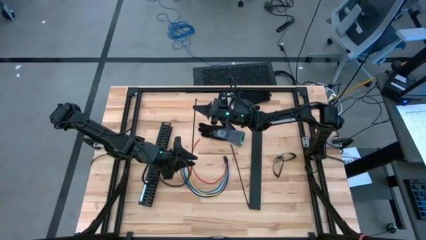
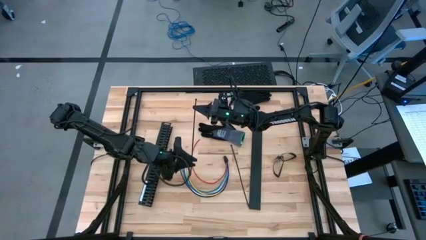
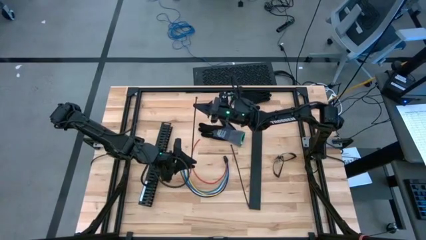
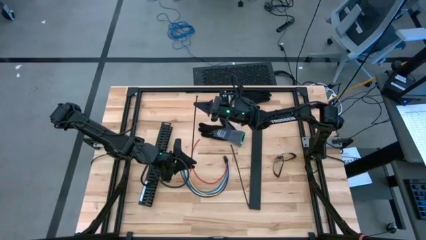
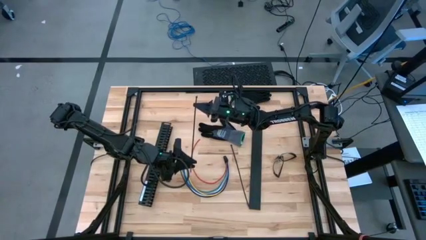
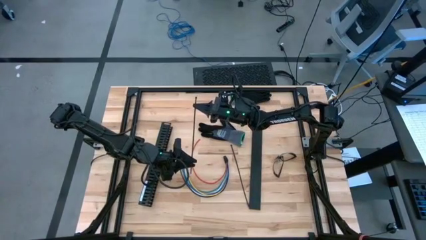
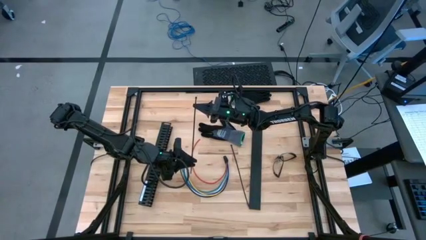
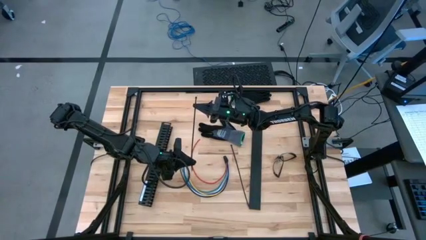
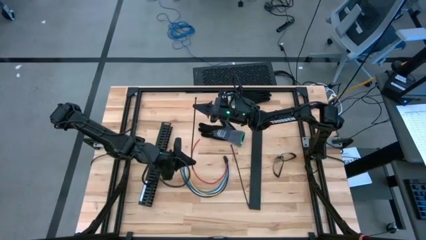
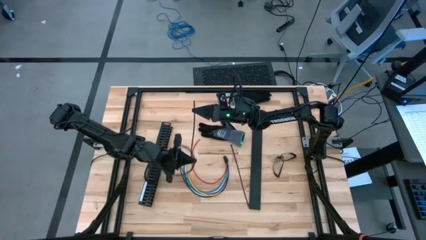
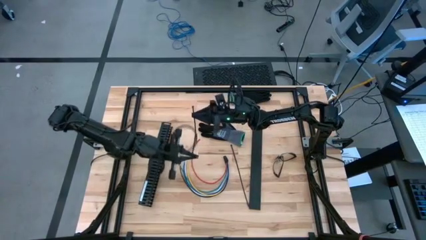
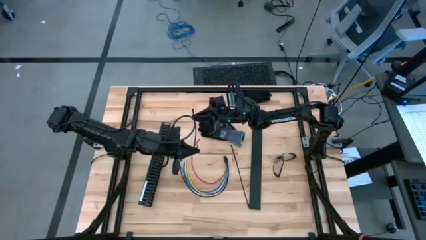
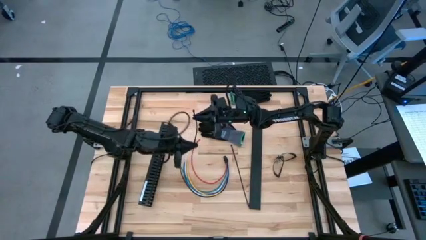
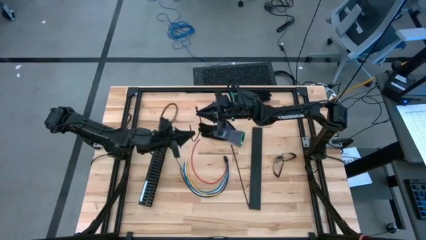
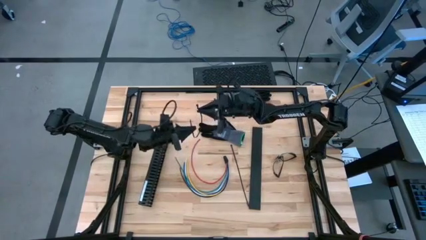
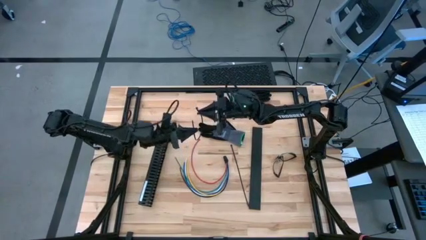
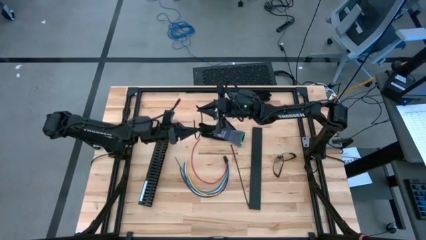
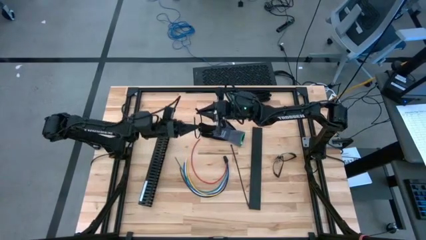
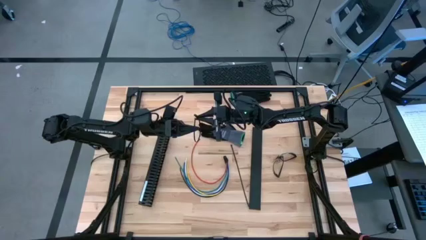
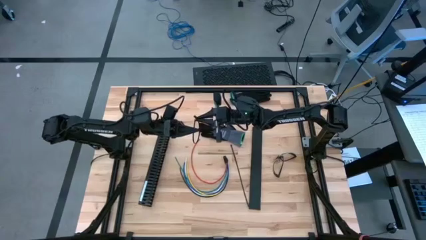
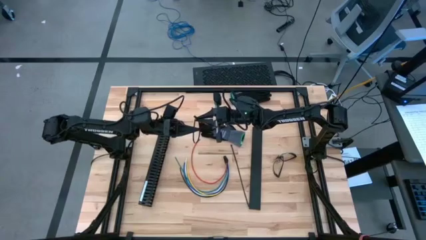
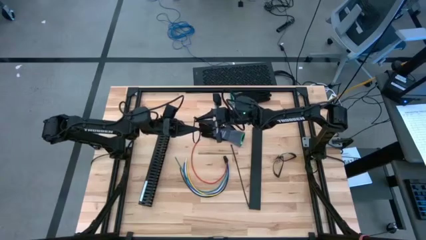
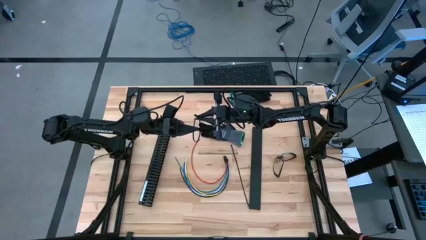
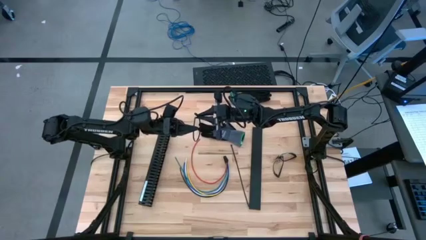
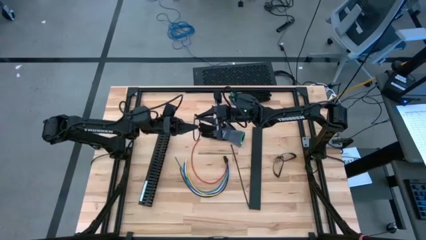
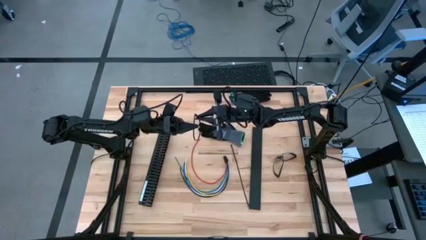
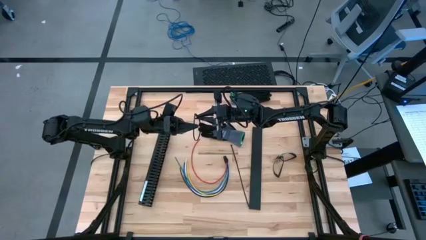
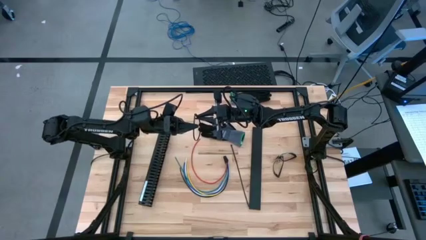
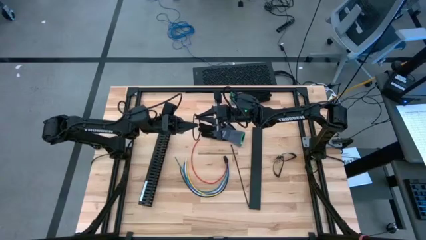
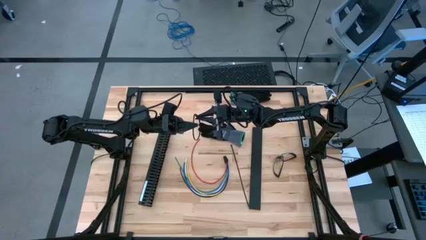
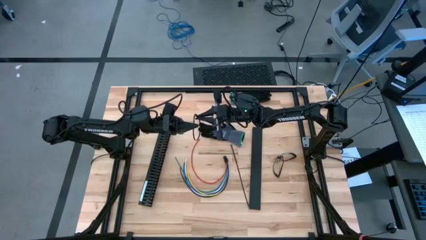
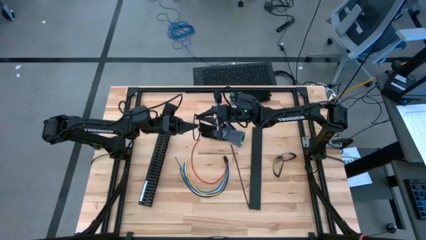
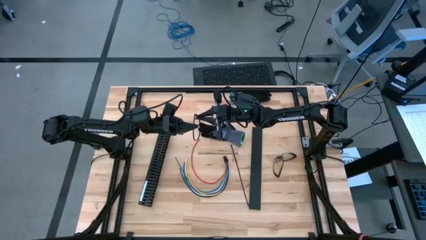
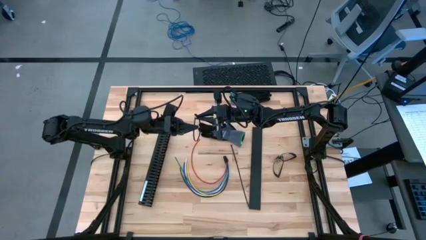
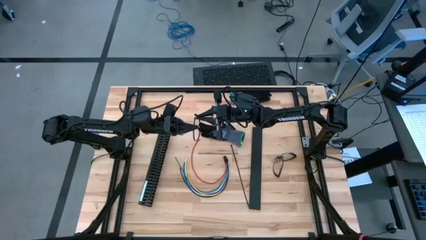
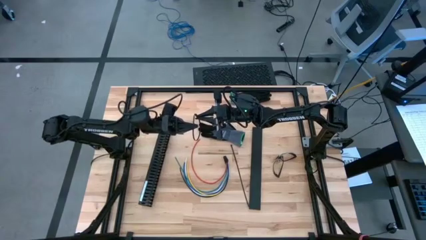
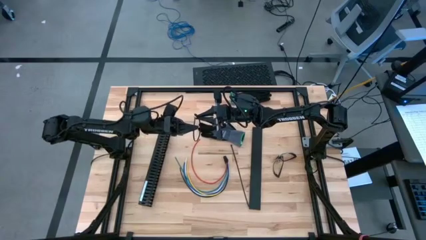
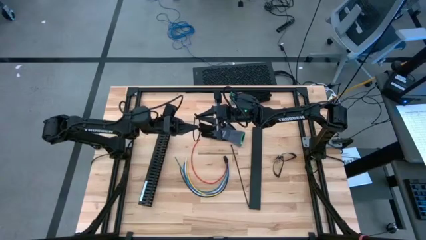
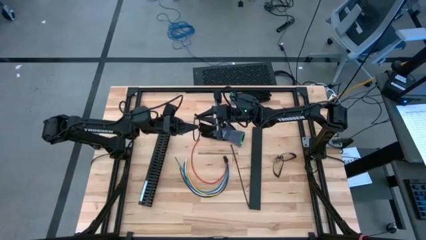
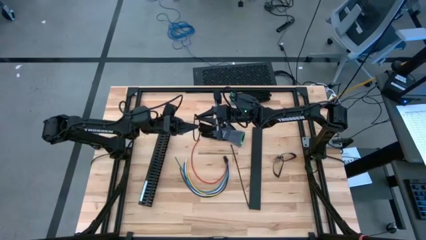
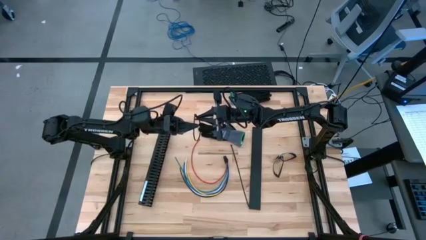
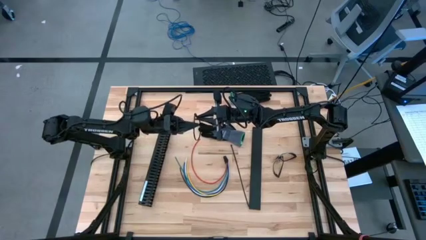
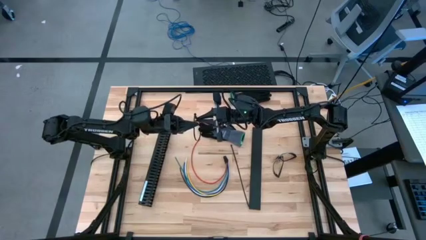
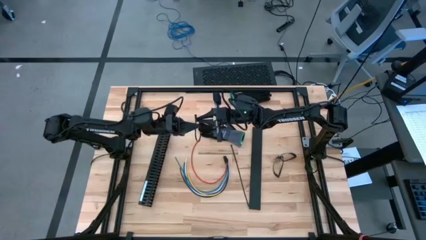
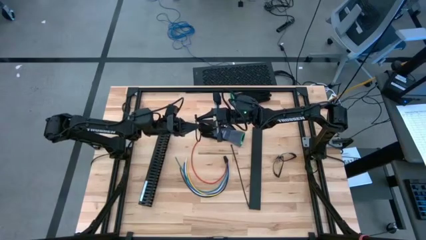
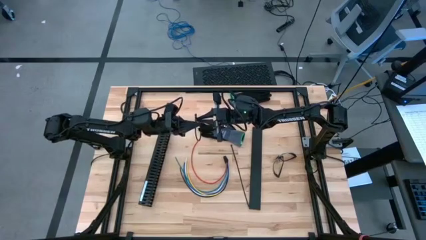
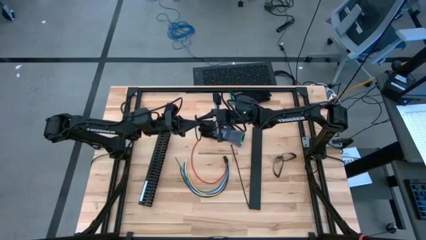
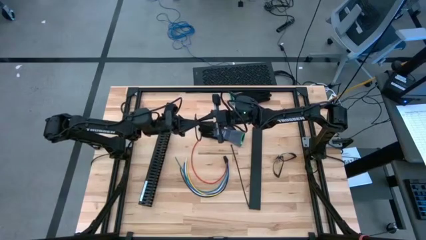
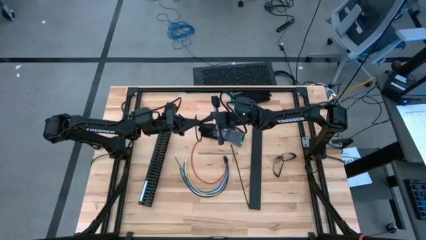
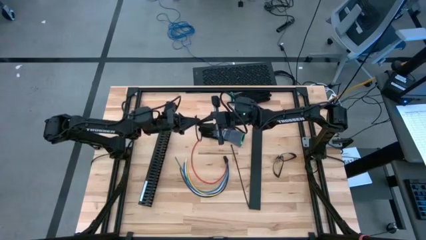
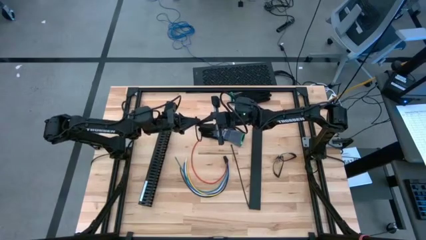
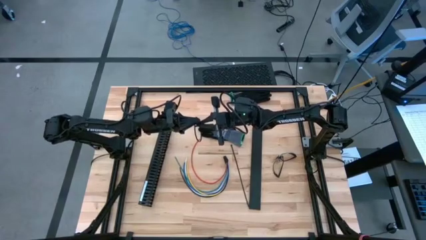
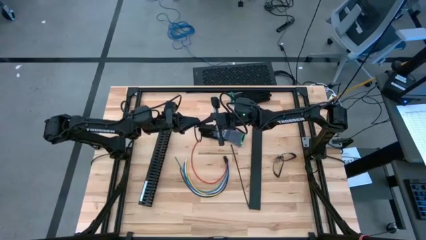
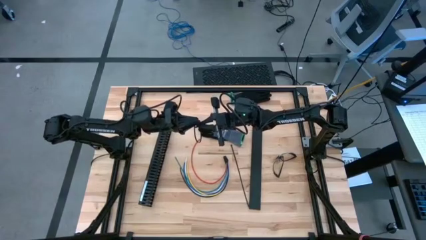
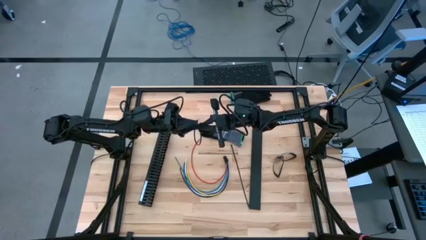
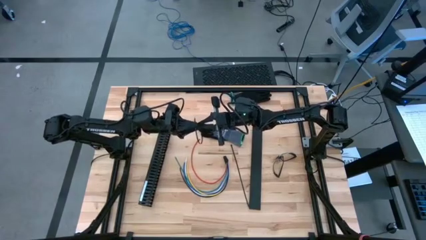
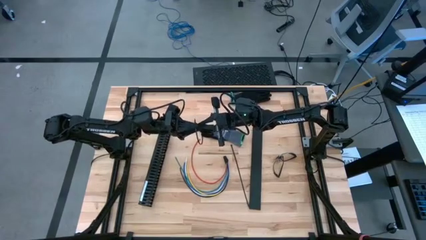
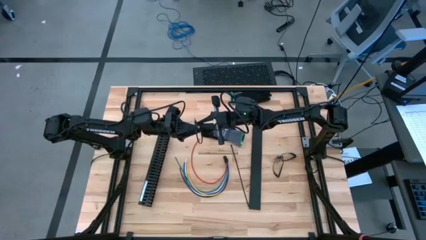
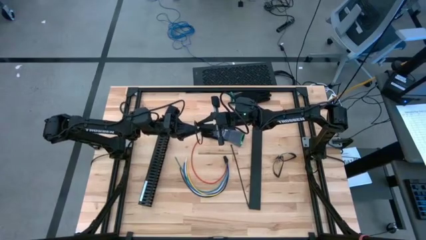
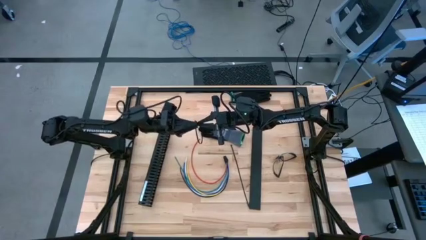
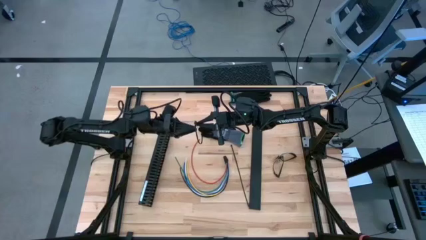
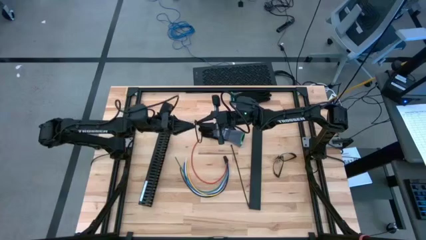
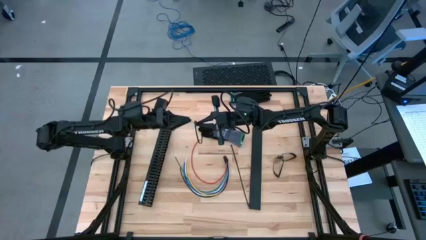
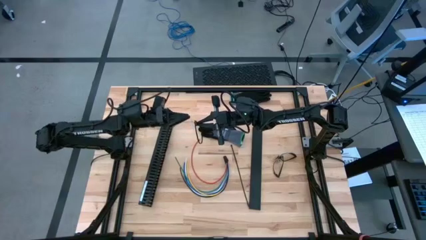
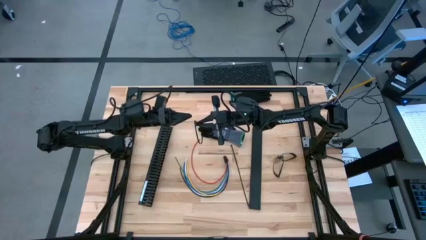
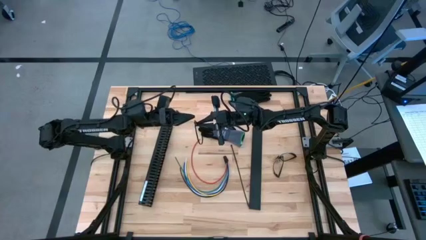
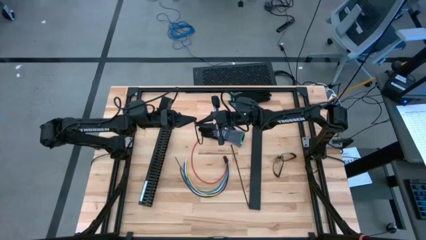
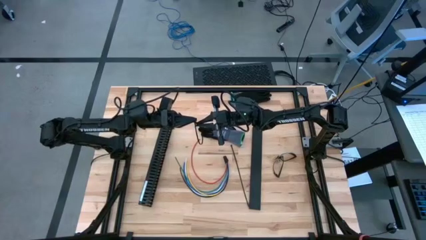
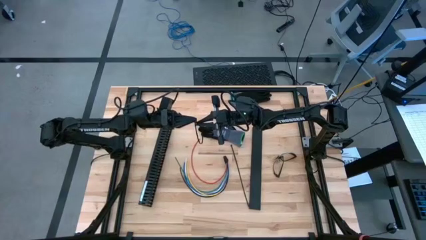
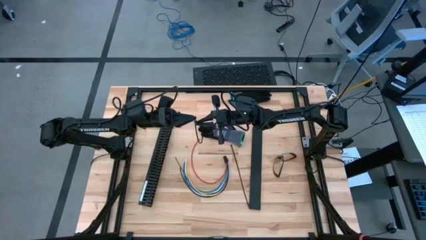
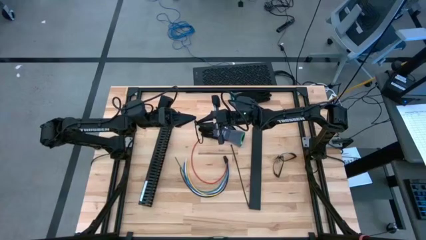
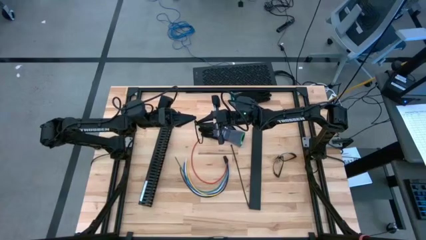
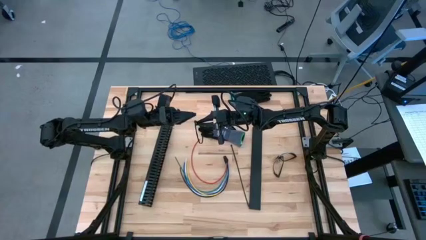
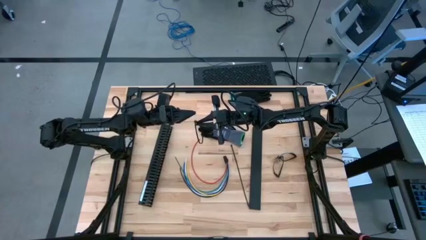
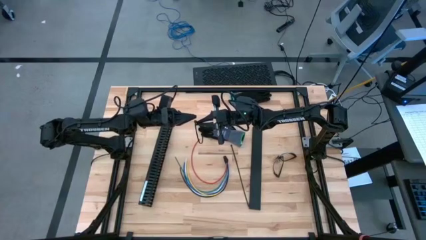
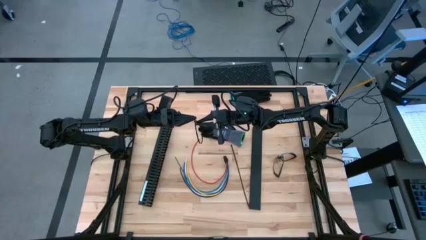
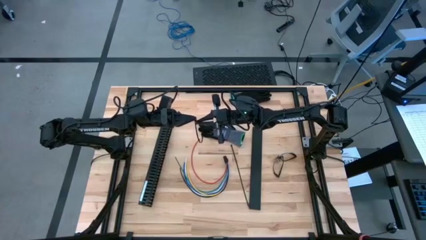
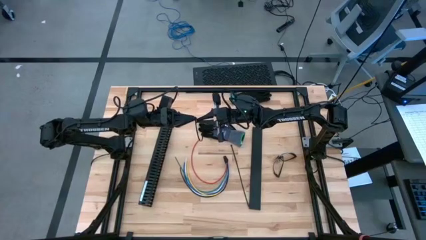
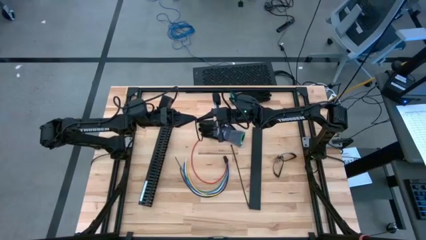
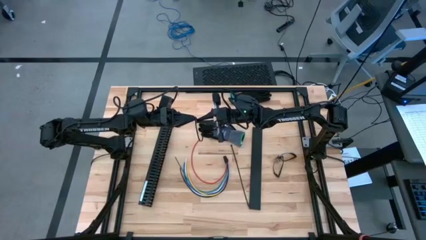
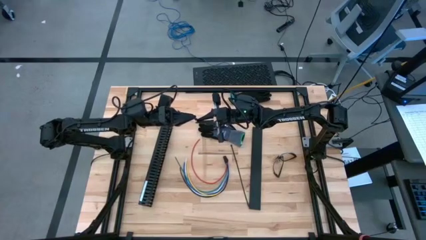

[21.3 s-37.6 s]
Task: Ziptie cables
Prepare the black zip tie
